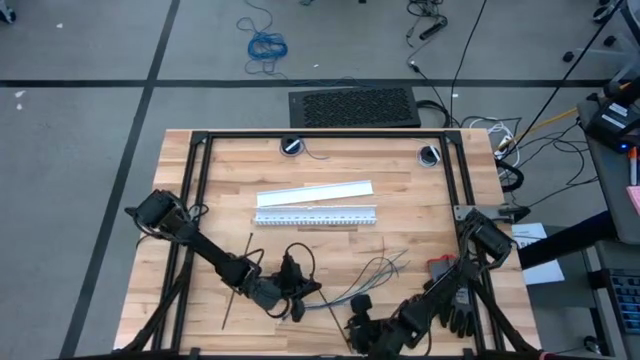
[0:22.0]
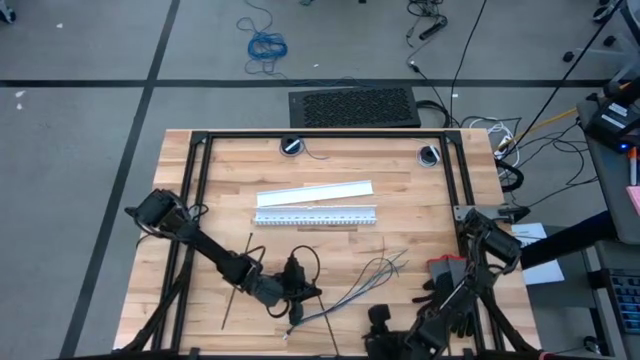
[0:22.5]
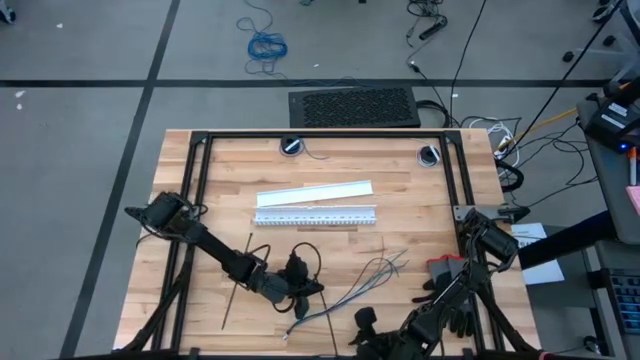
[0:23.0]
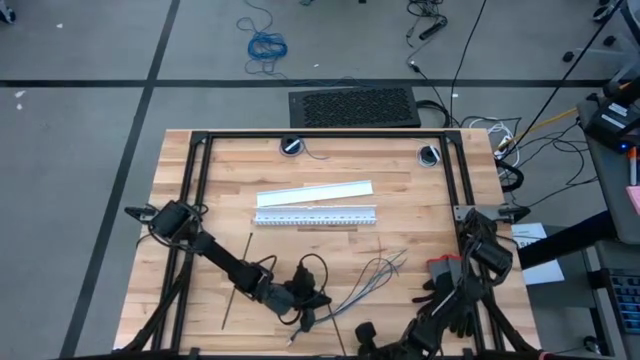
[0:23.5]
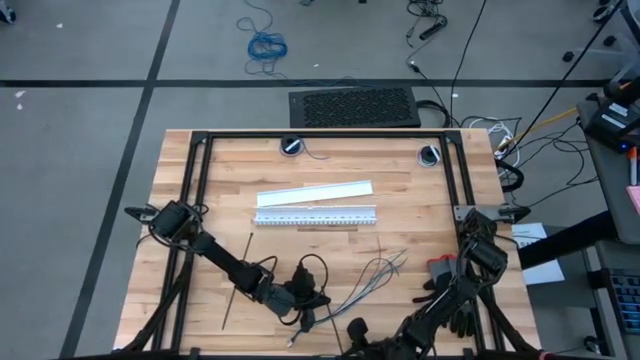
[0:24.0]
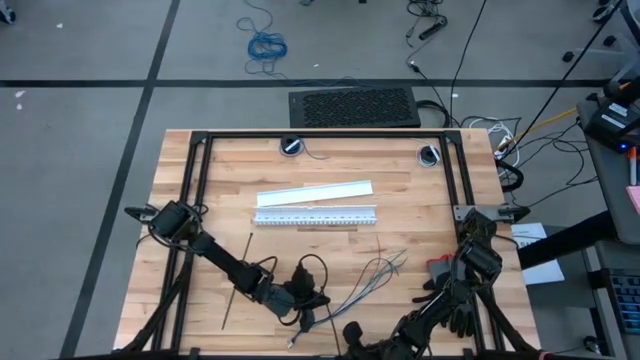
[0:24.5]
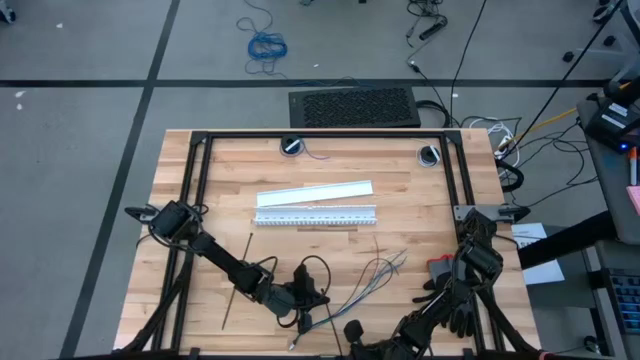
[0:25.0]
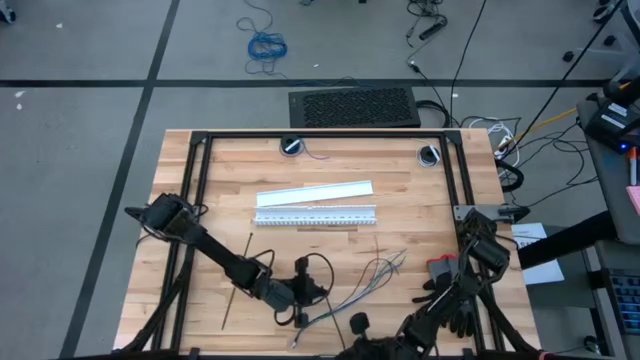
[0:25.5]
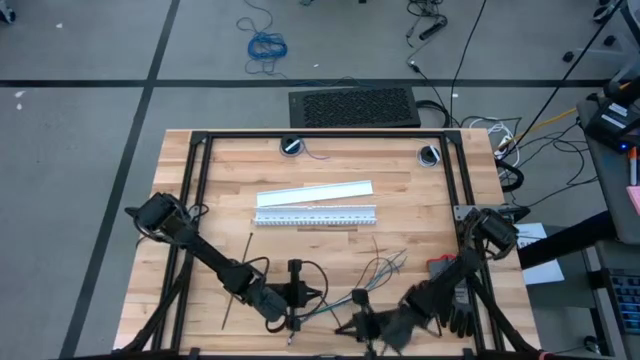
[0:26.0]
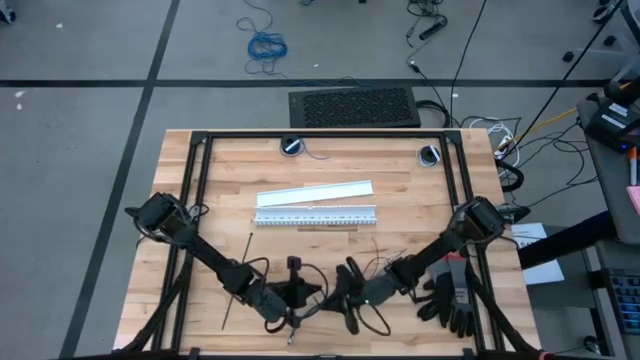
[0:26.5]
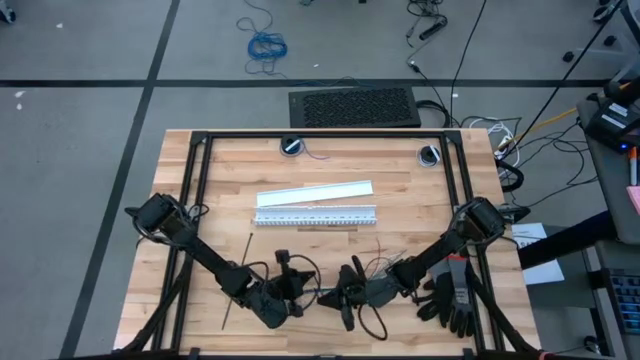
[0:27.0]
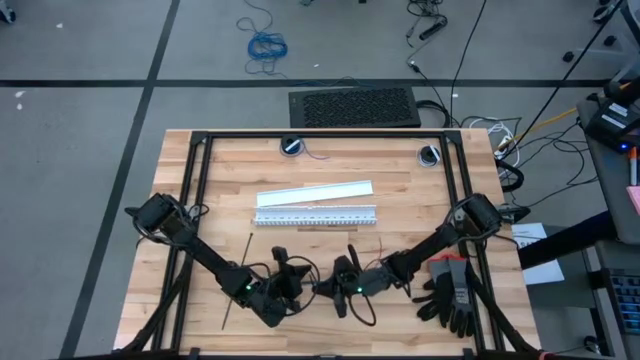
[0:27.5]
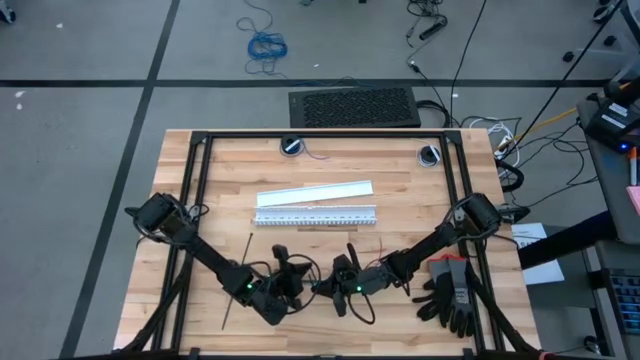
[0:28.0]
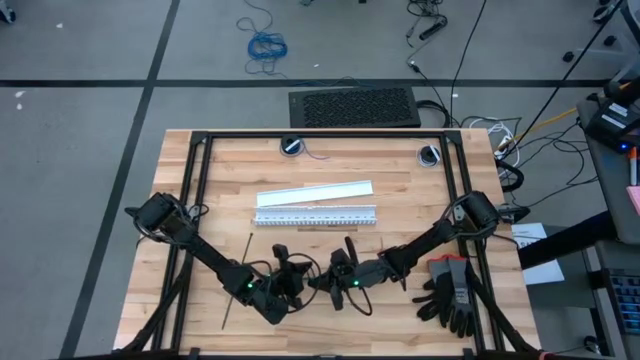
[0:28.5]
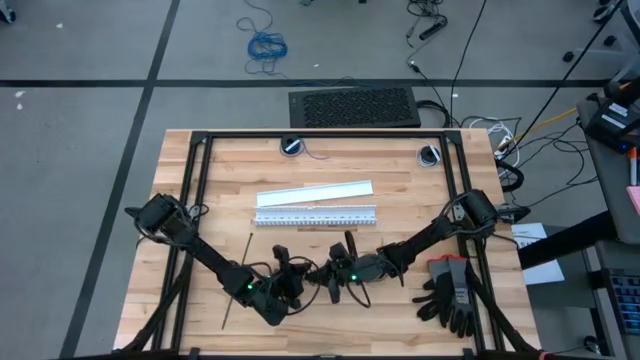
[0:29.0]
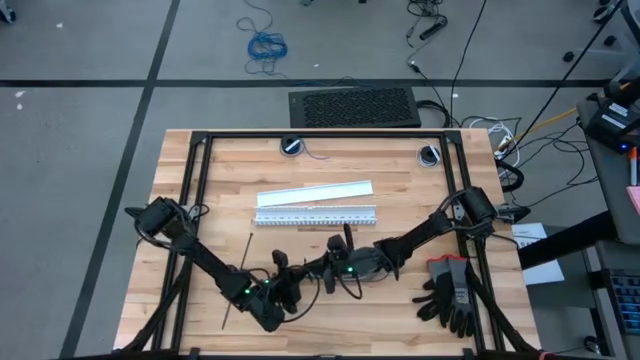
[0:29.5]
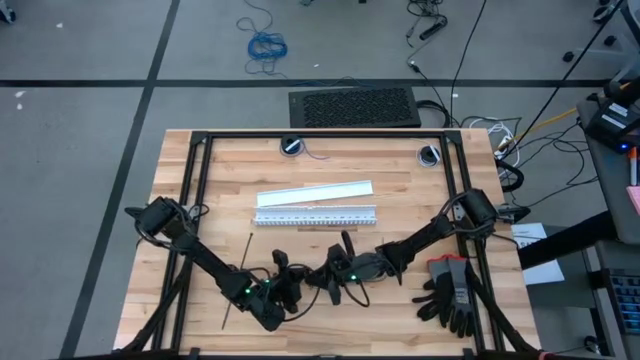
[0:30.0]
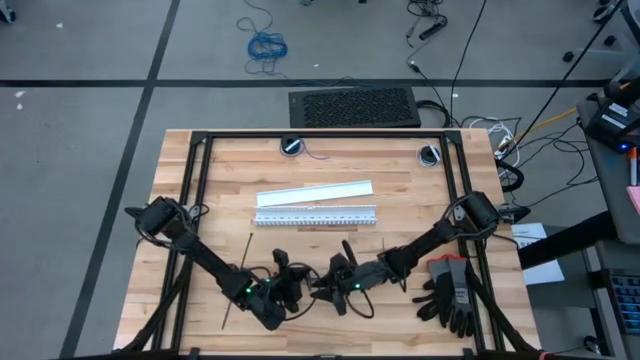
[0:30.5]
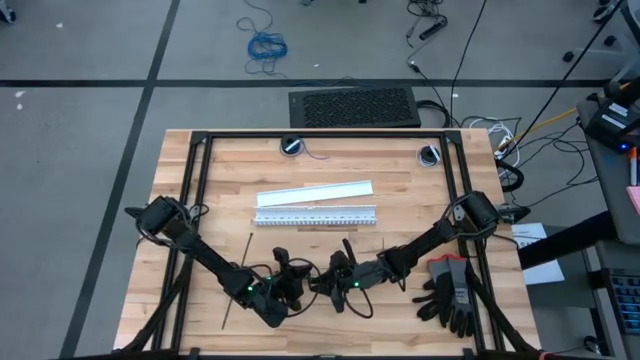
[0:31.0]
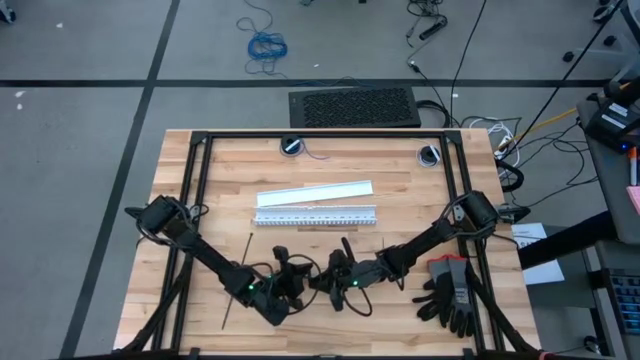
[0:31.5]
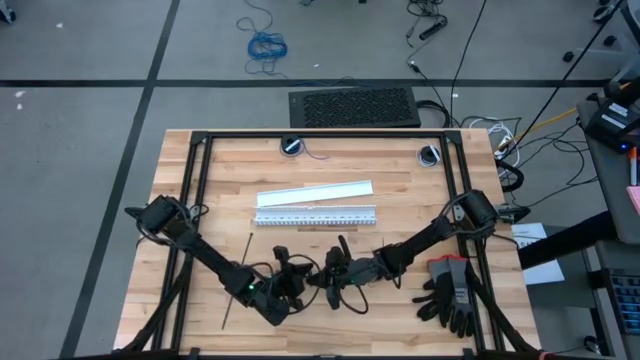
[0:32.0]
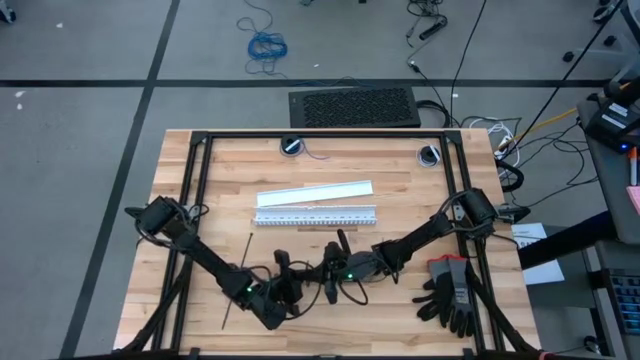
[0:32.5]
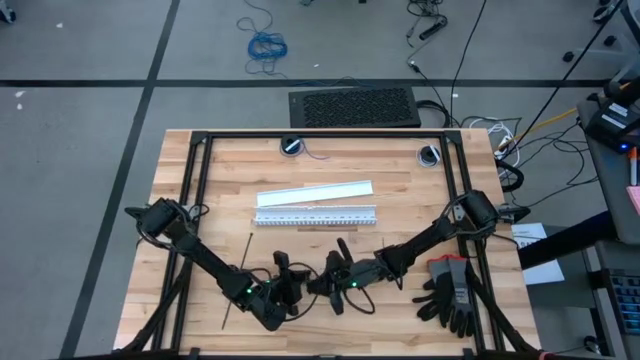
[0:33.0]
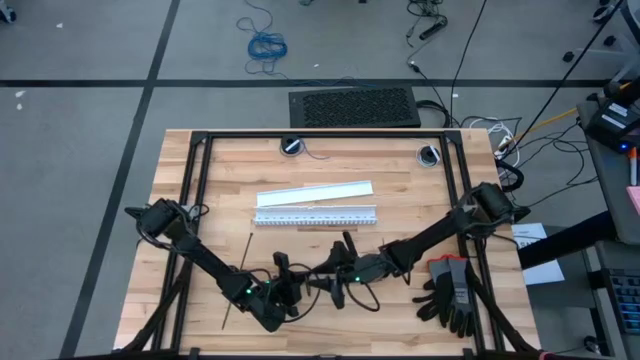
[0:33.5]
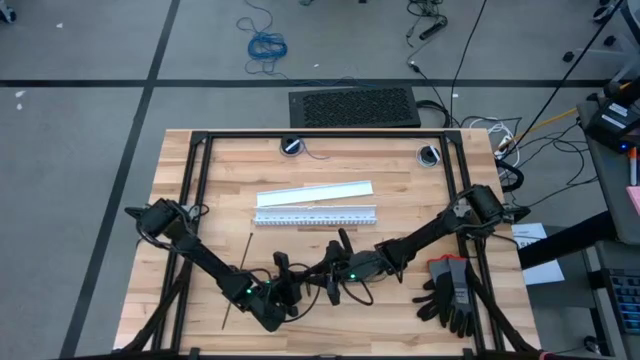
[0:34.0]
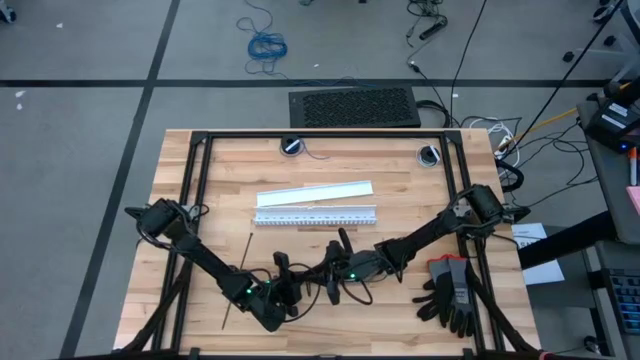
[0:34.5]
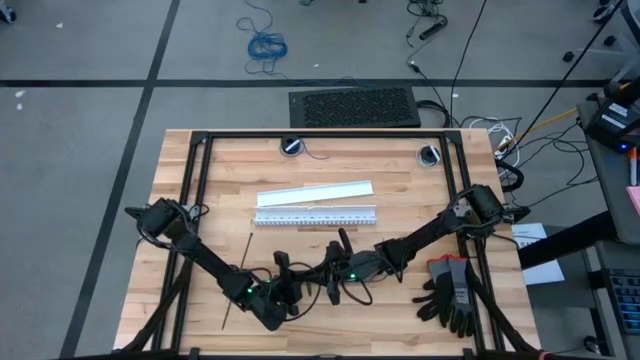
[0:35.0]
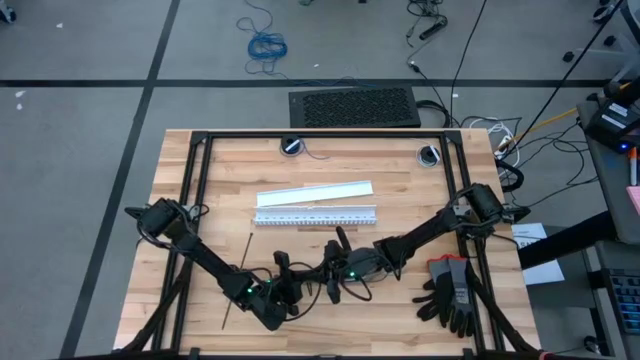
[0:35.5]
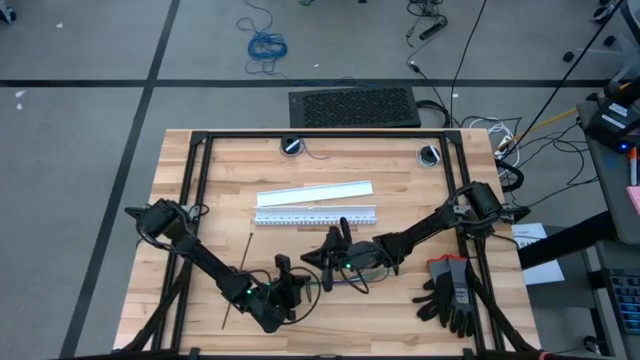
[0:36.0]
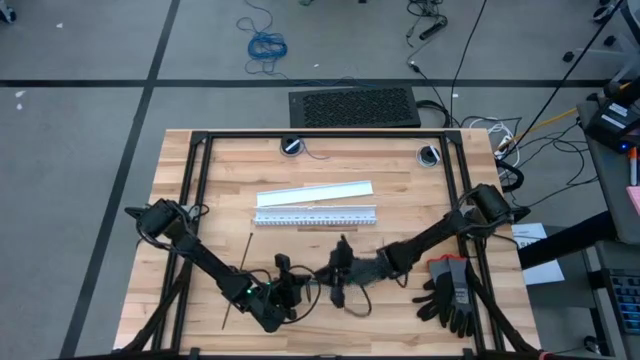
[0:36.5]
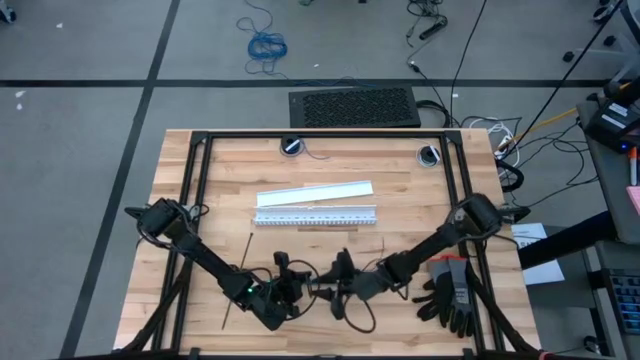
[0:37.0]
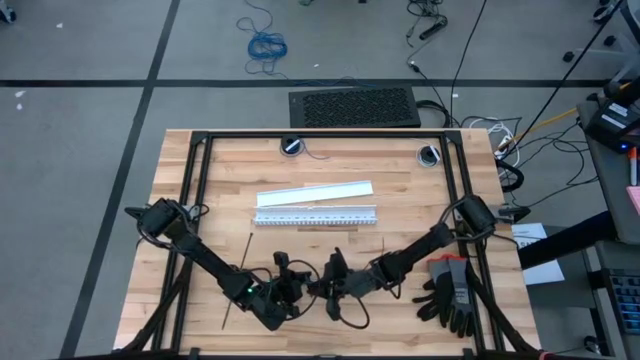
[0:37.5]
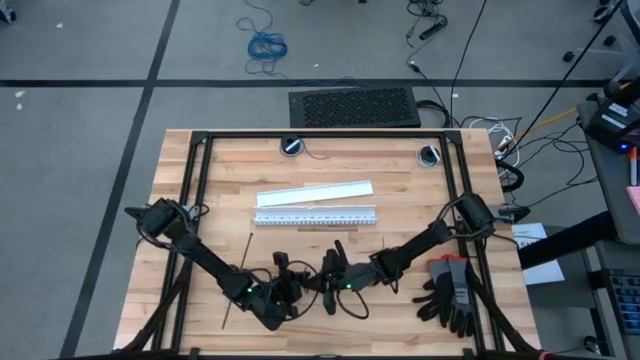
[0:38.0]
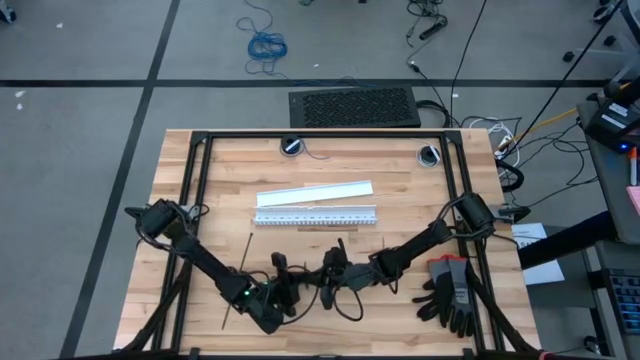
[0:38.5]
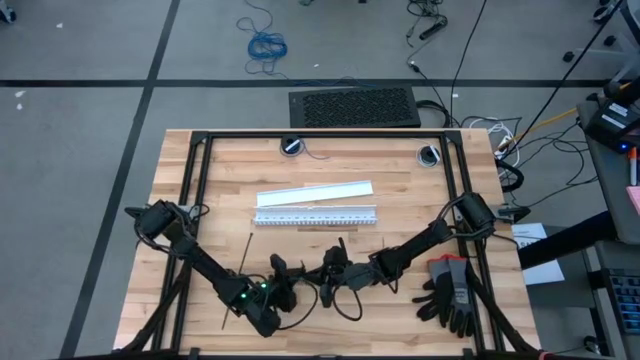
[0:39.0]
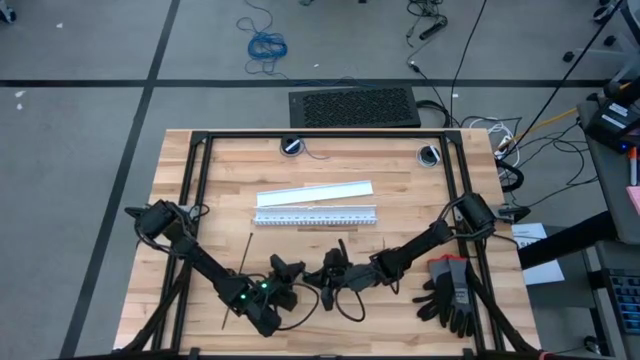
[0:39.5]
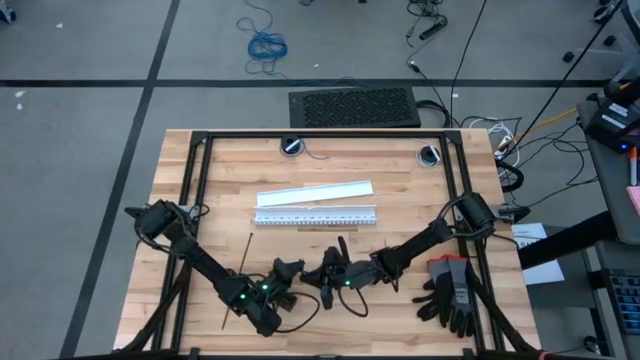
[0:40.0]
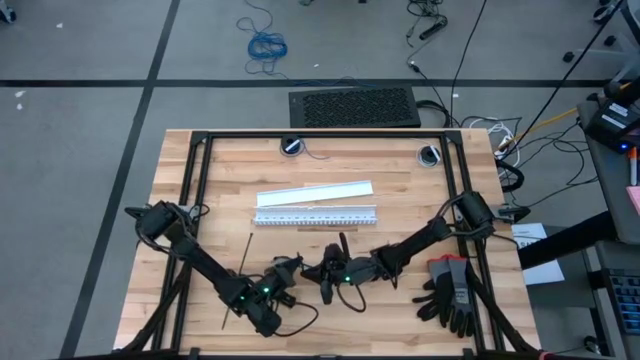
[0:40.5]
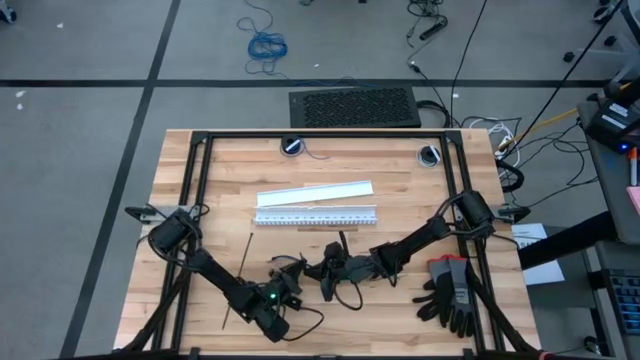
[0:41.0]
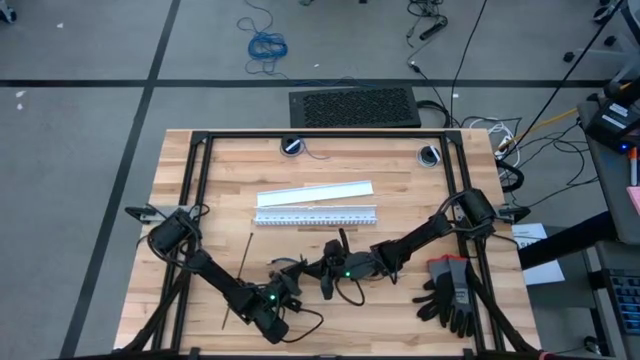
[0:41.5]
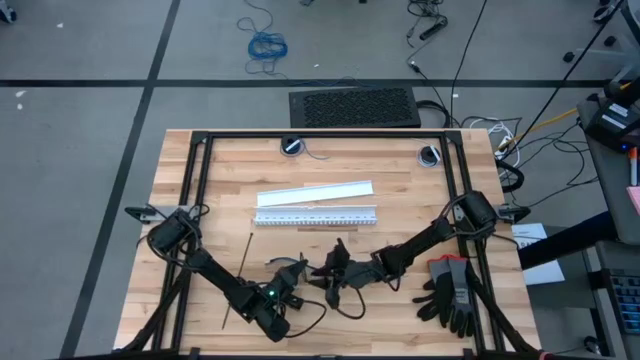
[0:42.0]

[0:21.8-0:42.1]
Task: Ziptie cables
Wrap the left black zip tie around the colored cable wires
